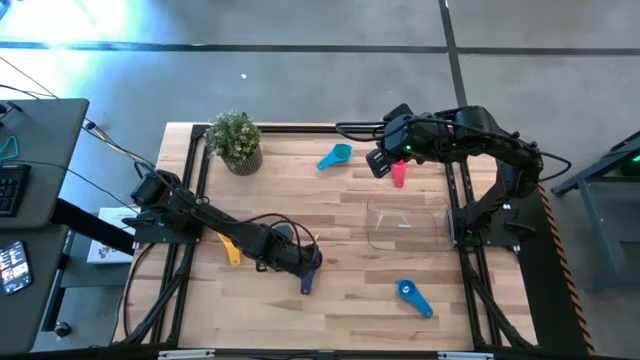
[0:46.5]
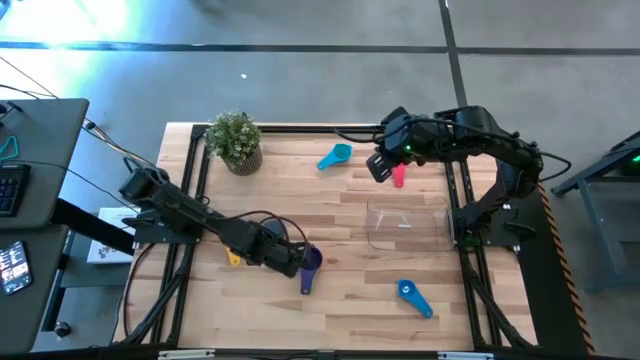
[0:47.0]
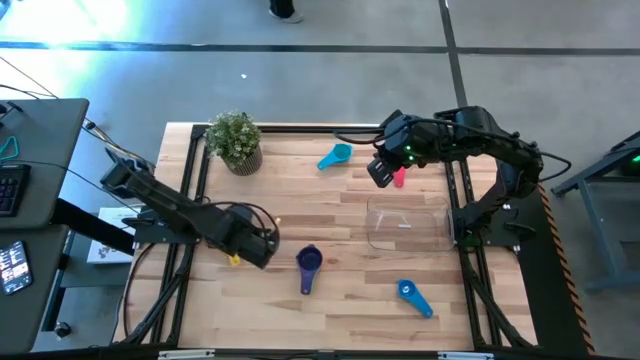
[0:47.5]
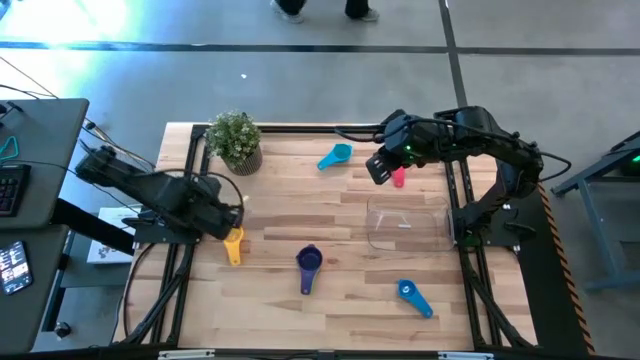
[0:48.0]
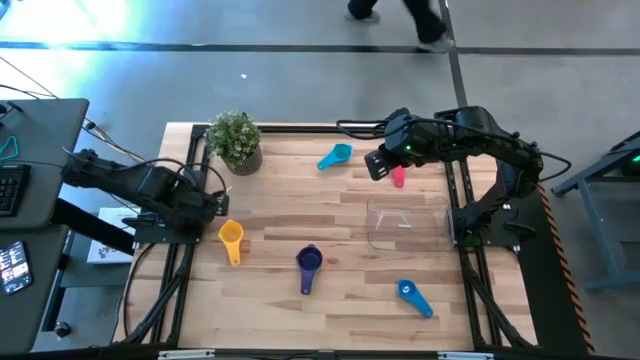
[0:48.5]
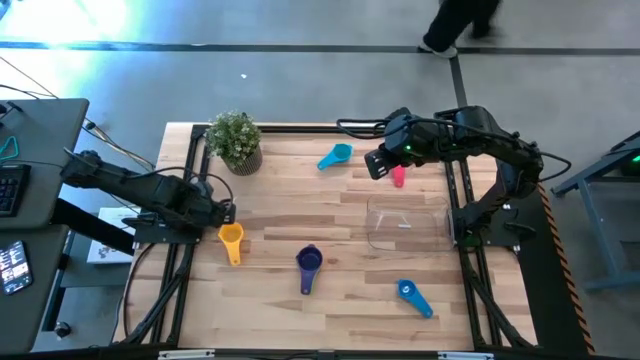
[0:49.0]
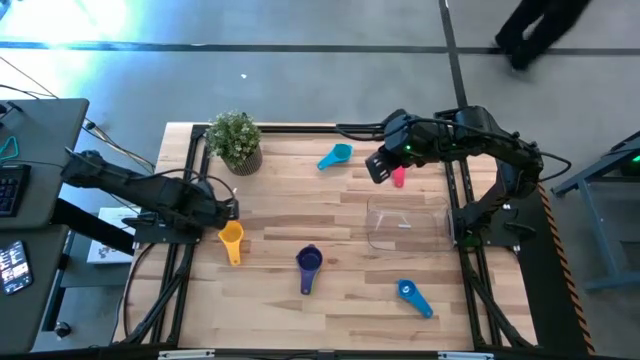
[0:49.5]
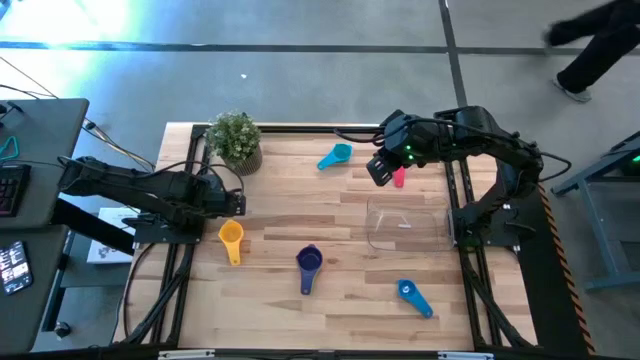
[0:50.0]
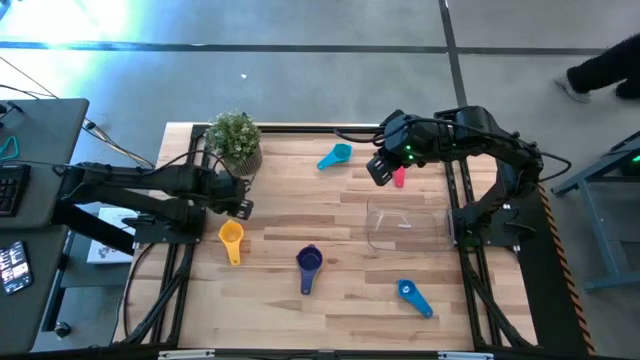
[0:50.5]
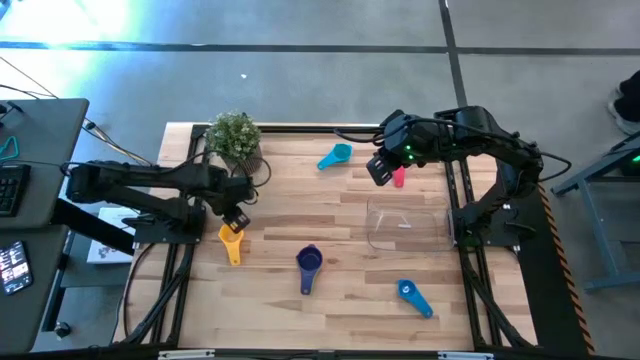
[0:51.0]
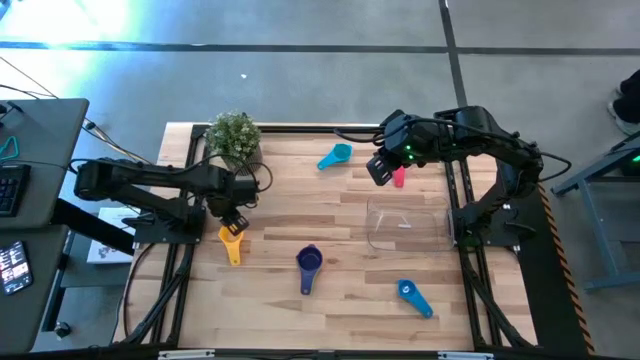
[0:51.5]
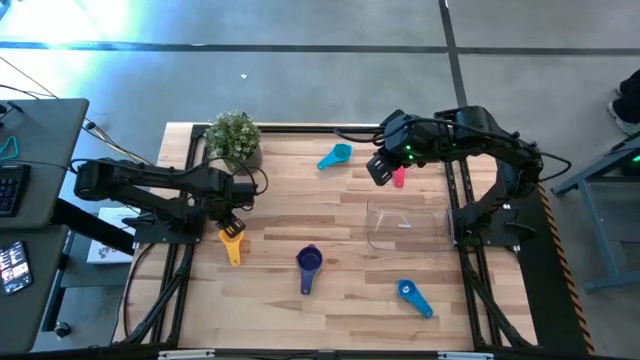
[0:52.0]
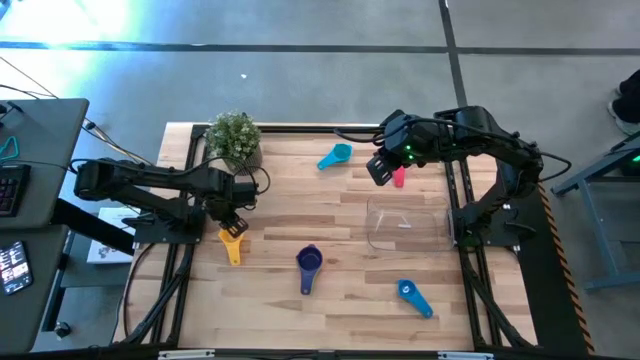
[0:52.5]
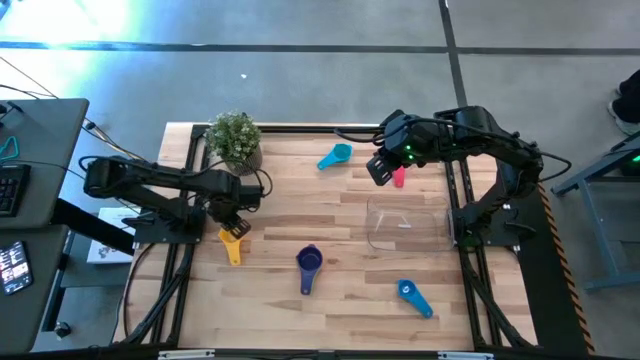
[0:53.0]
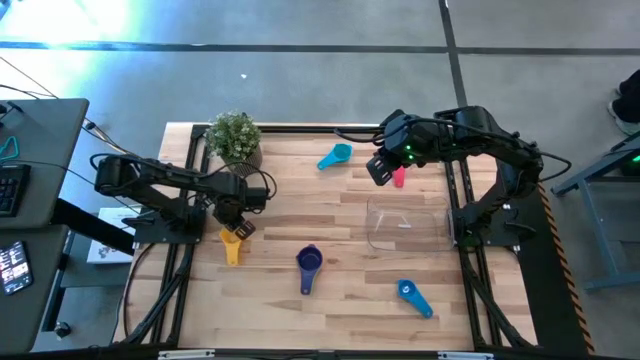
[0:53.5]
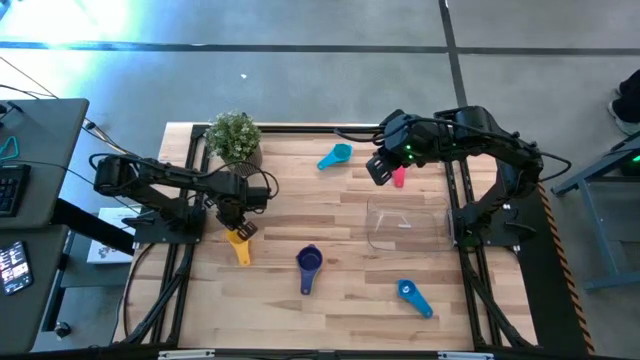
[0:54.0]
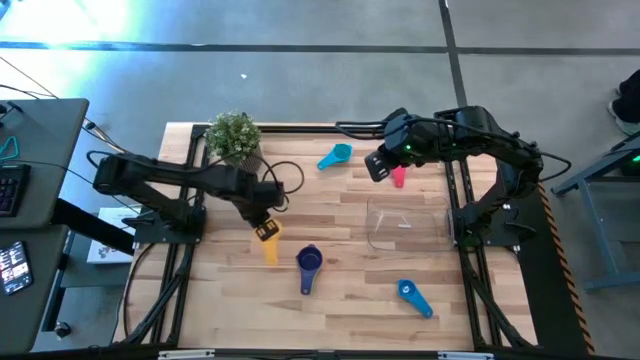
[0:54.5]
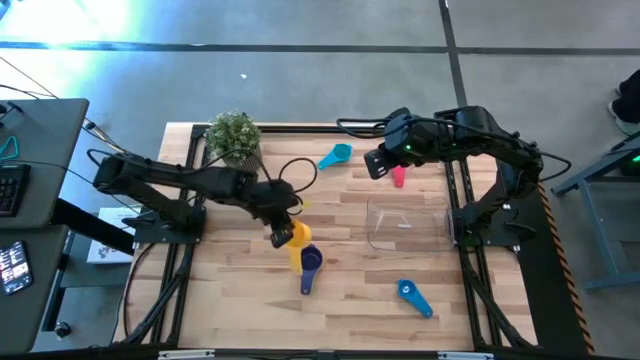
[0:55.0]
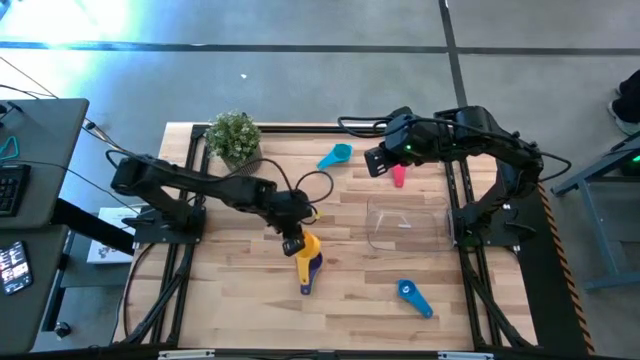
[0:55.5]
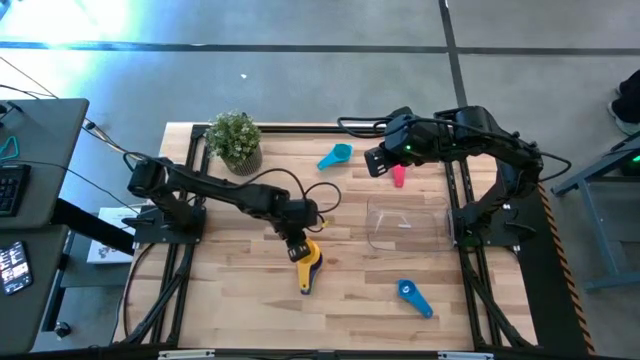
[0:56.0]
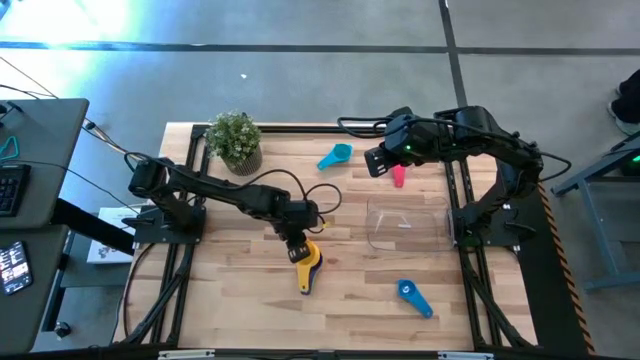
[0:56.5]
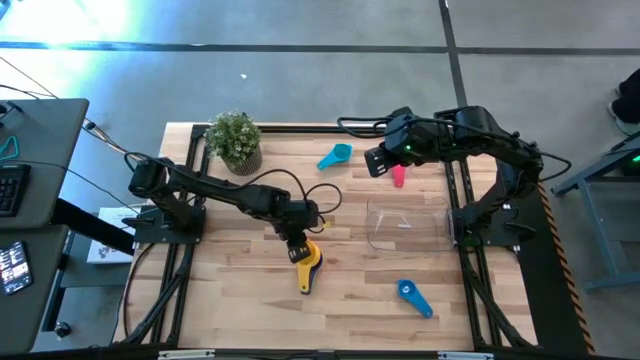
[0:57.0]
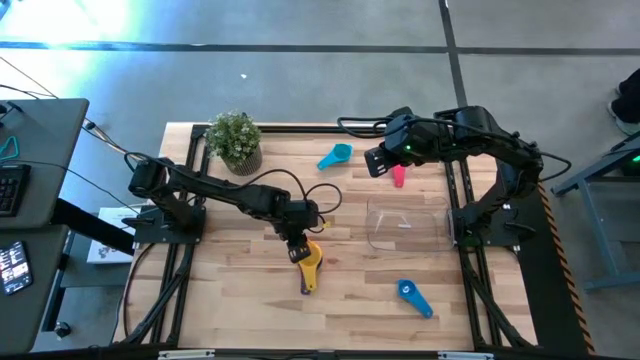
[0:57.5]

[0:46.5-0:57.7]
Task: Nest measuring cups in basket
Stack the yellow measuring cup on top of the violet measuring cup

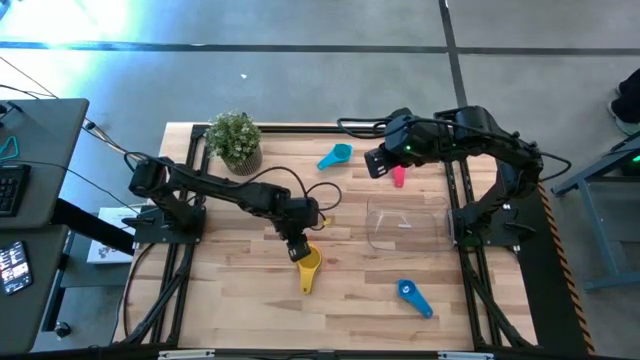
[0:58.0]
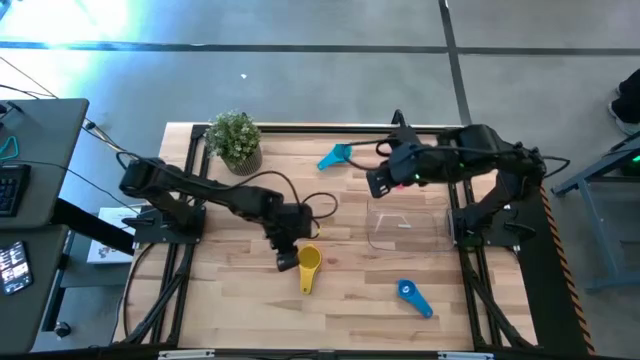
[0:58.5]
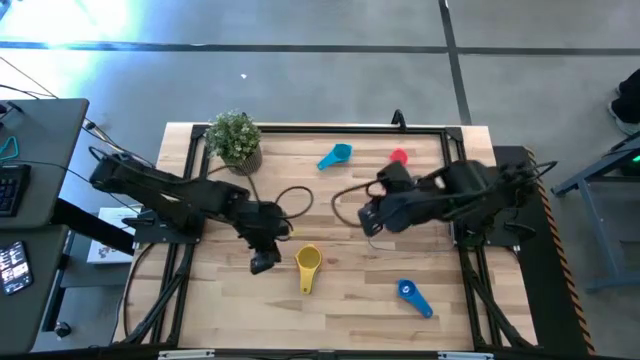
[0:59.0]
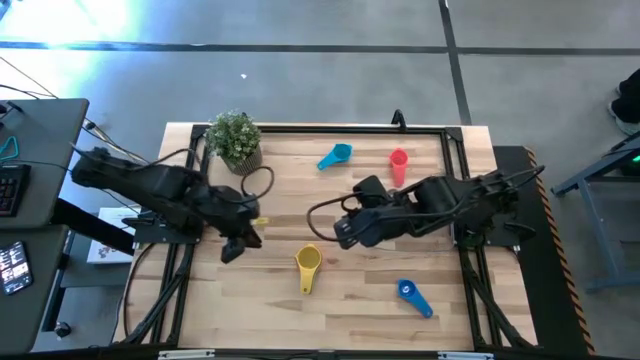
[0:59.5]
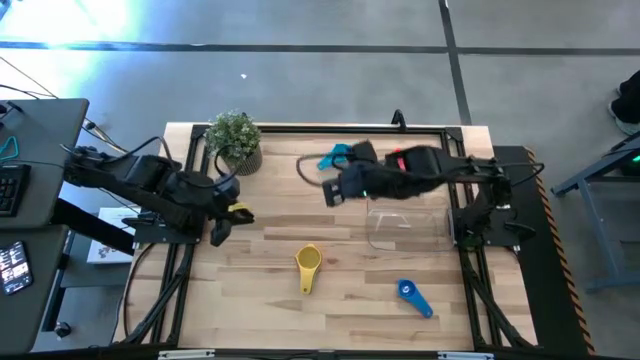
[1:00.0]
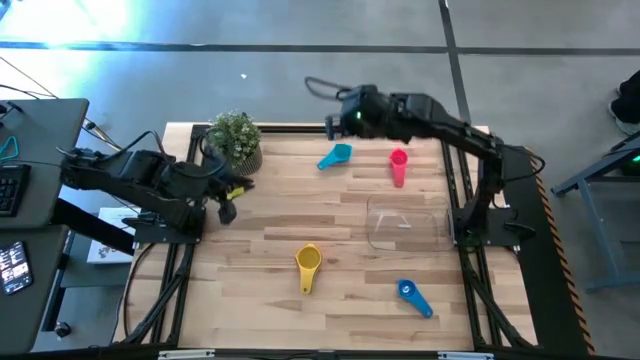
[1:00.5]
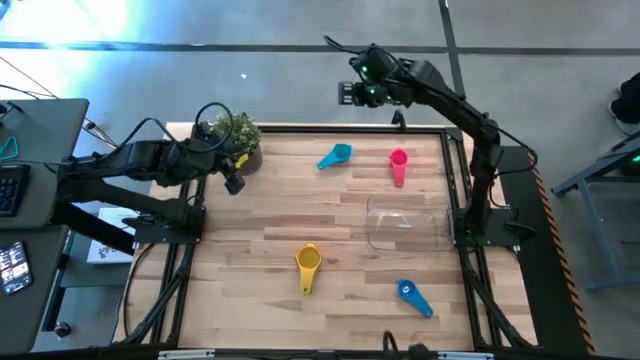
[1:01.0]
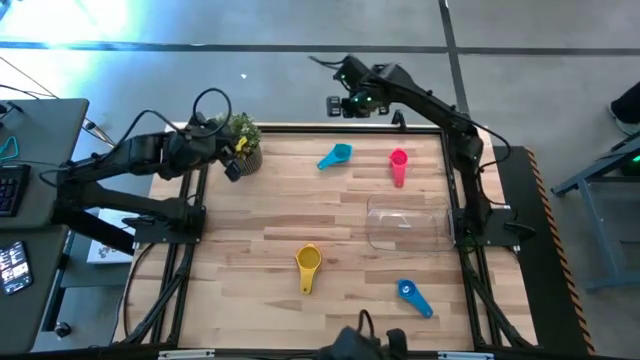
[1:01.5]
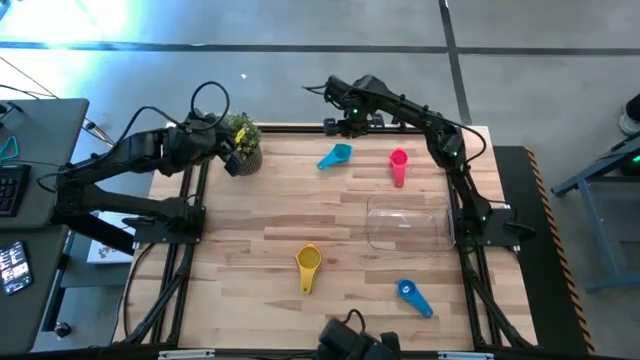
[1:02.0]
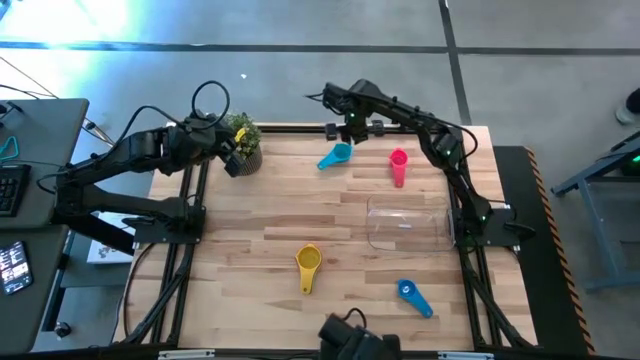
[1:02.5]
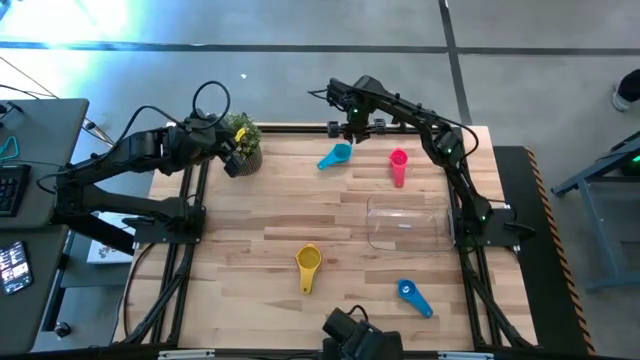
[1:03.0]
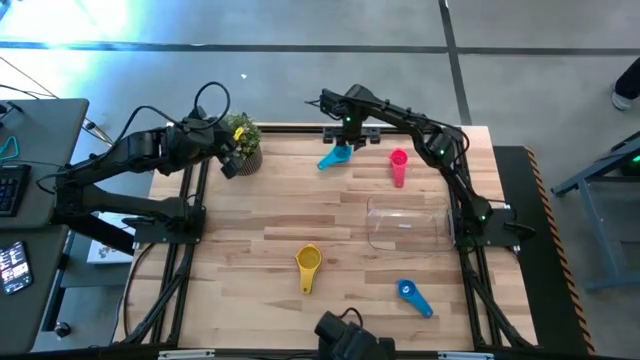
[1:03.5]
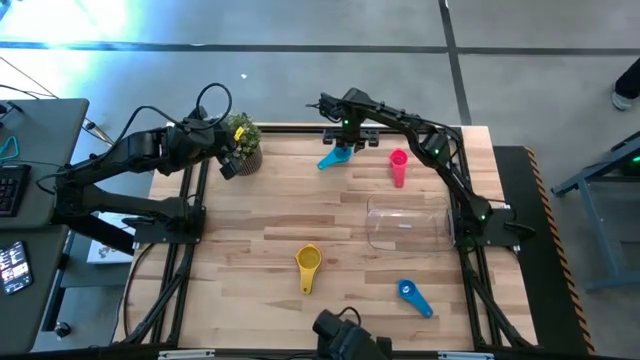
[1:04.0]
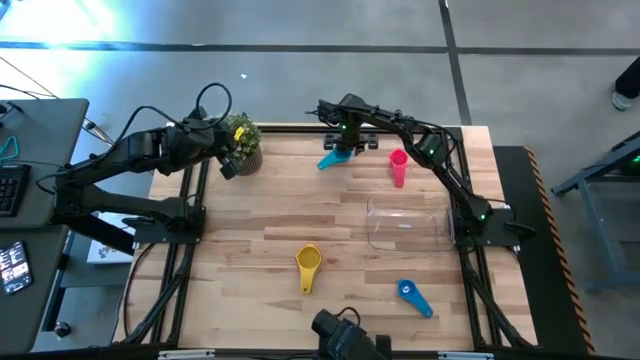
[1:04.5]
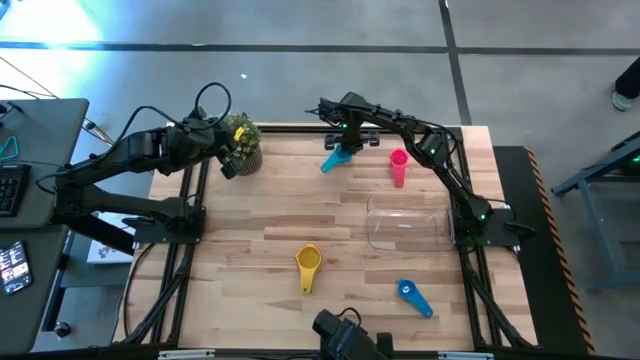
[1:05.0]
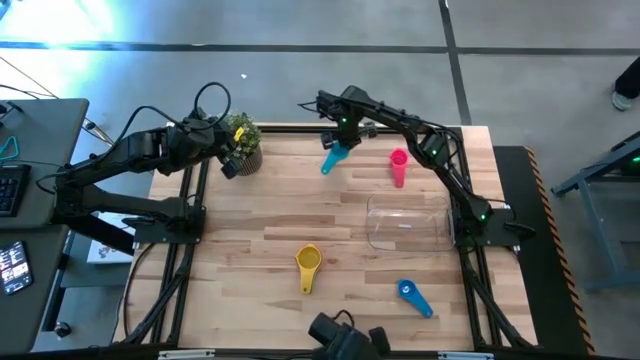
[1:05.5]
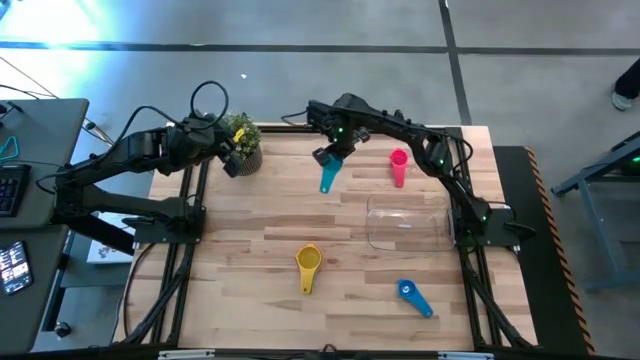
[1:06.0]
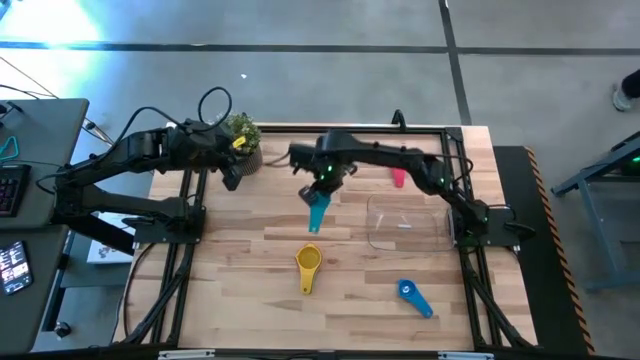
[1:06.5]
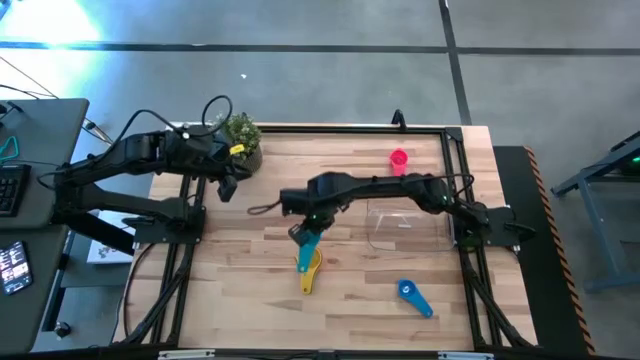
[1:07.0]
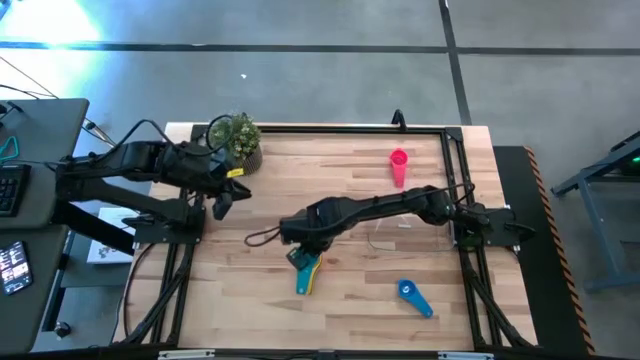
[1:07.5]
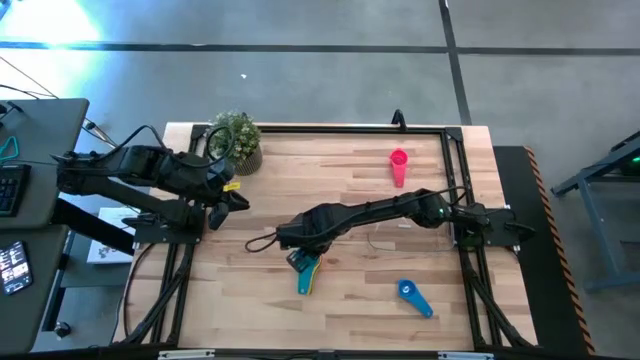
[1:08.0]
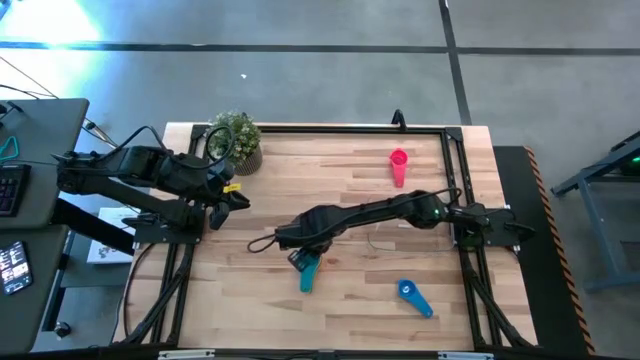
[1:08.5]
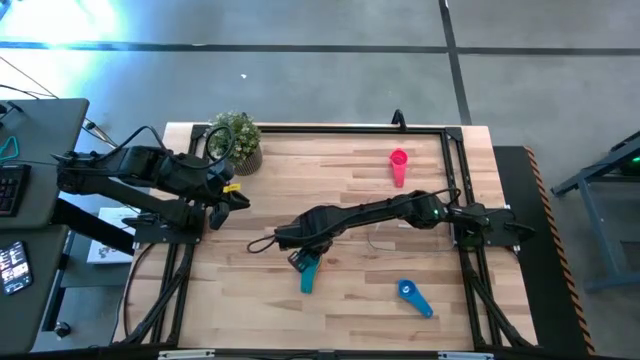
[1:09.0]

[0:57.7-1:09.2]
Stack the light blue measuring cup on top of the yellow measuring cup
